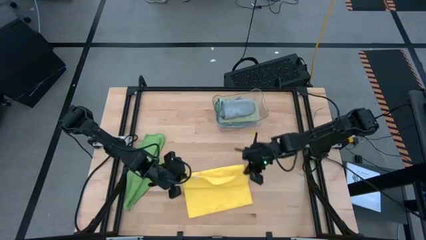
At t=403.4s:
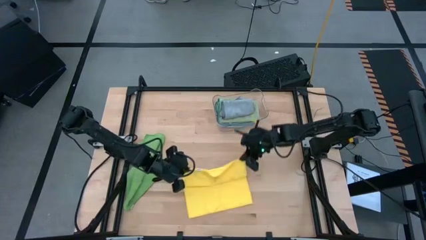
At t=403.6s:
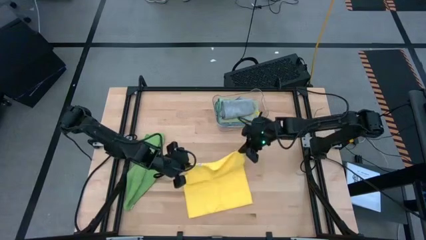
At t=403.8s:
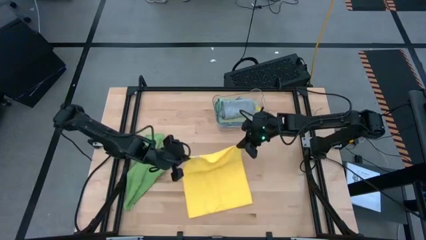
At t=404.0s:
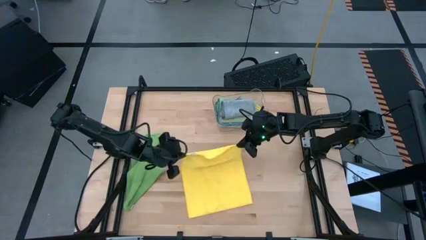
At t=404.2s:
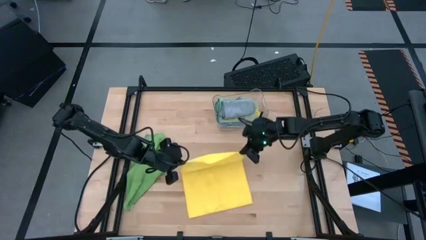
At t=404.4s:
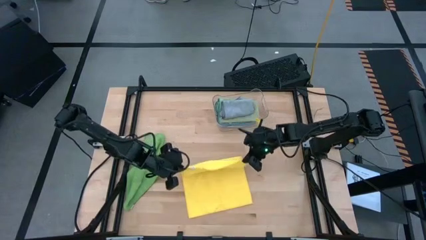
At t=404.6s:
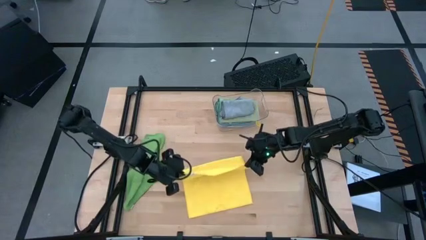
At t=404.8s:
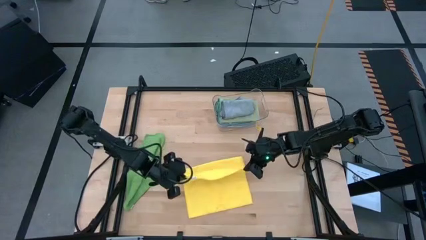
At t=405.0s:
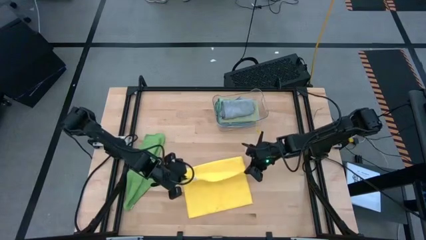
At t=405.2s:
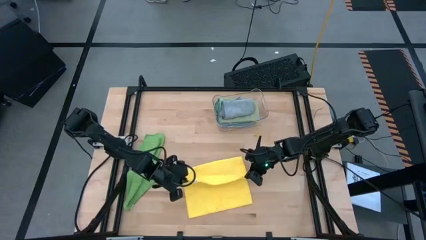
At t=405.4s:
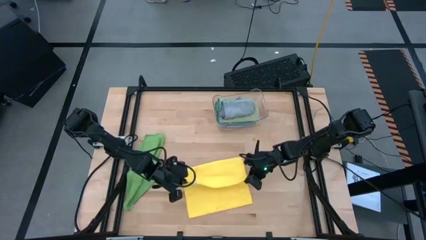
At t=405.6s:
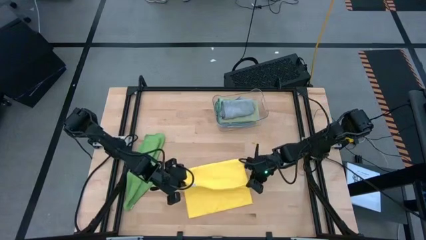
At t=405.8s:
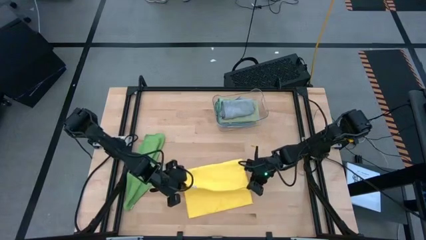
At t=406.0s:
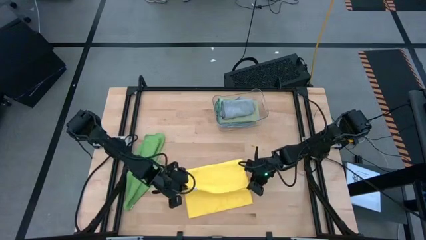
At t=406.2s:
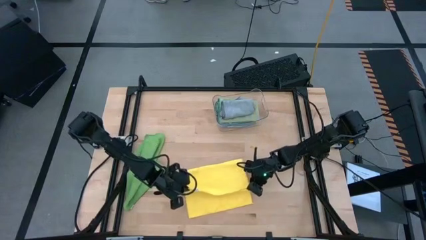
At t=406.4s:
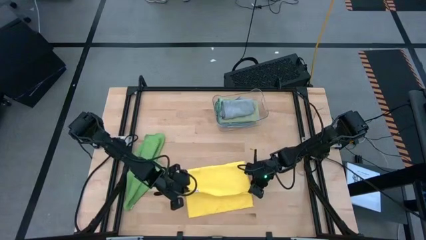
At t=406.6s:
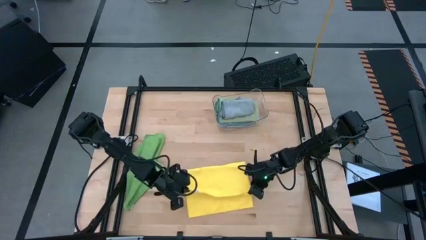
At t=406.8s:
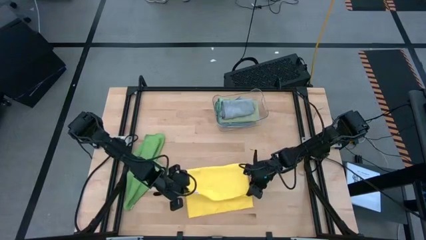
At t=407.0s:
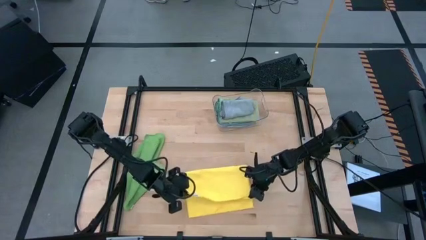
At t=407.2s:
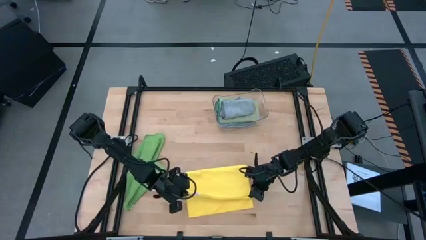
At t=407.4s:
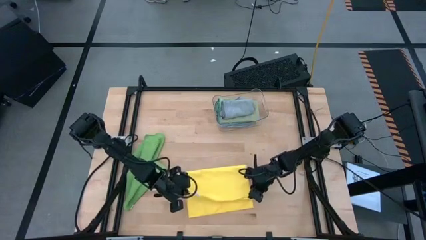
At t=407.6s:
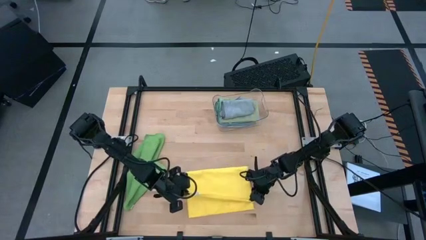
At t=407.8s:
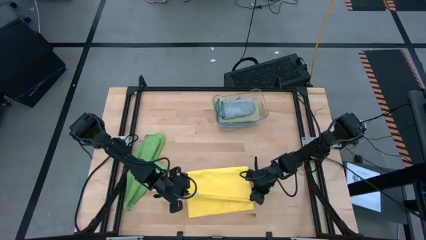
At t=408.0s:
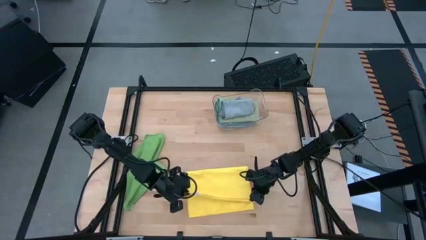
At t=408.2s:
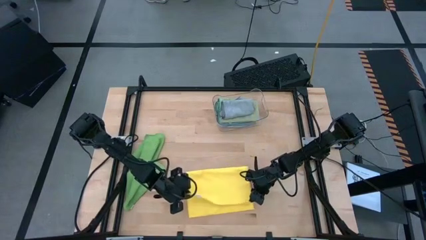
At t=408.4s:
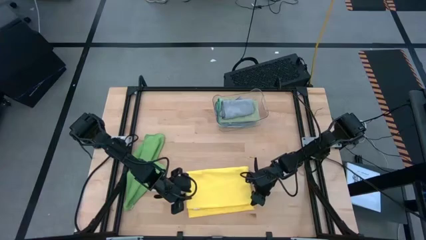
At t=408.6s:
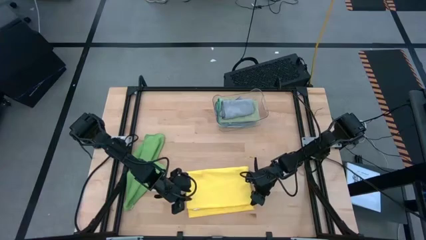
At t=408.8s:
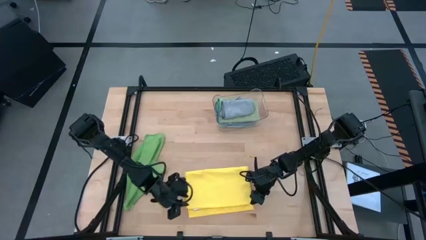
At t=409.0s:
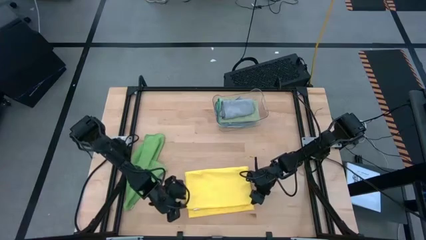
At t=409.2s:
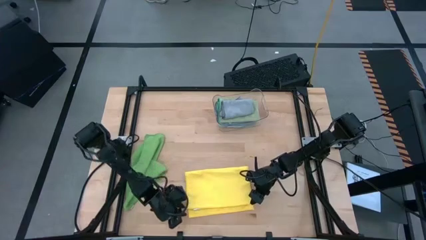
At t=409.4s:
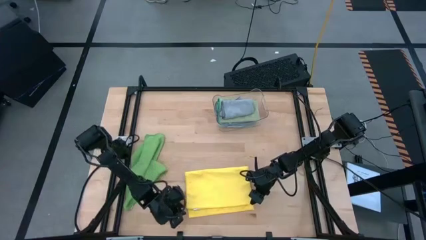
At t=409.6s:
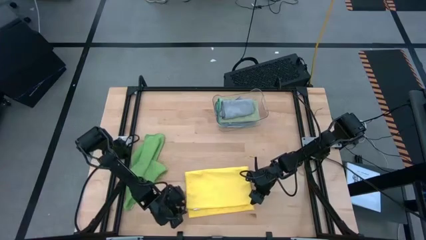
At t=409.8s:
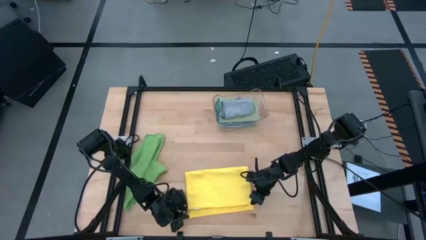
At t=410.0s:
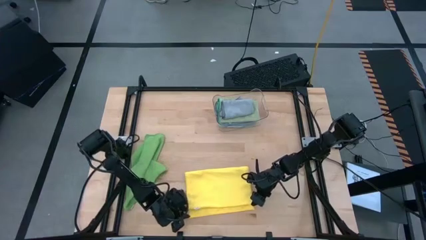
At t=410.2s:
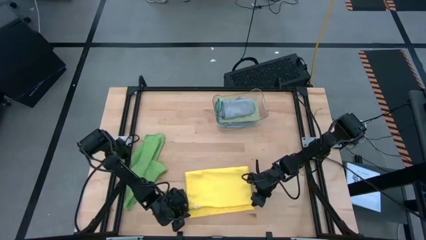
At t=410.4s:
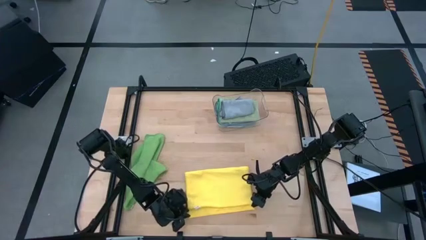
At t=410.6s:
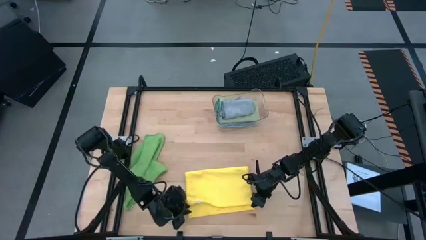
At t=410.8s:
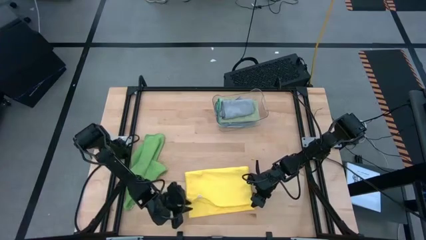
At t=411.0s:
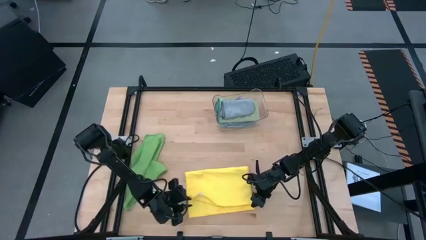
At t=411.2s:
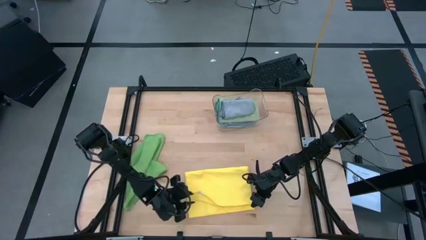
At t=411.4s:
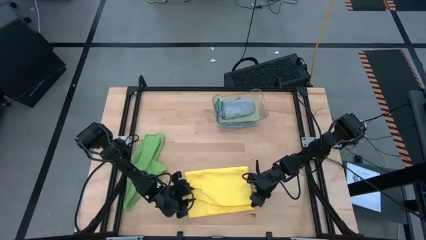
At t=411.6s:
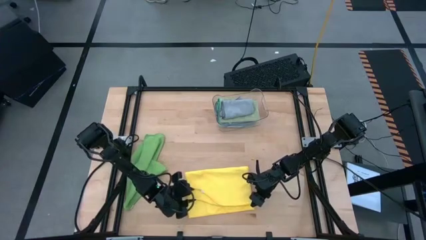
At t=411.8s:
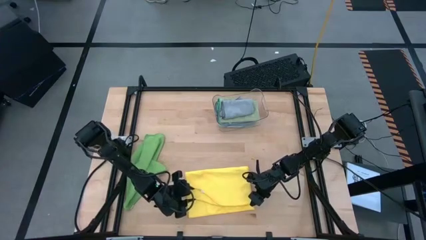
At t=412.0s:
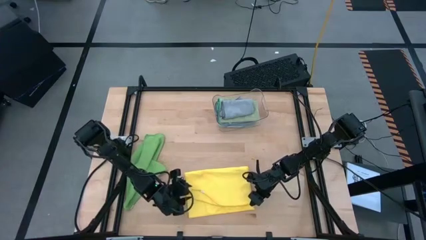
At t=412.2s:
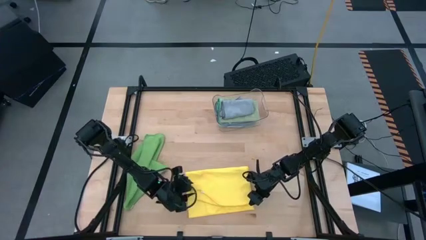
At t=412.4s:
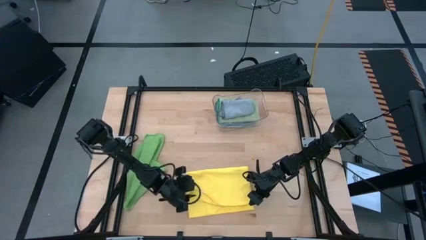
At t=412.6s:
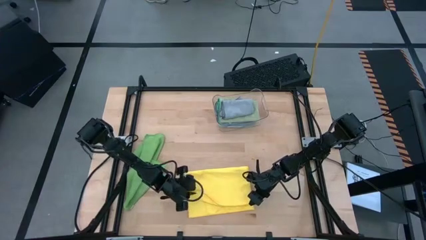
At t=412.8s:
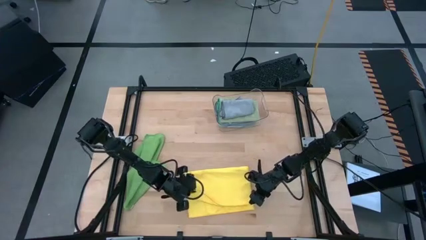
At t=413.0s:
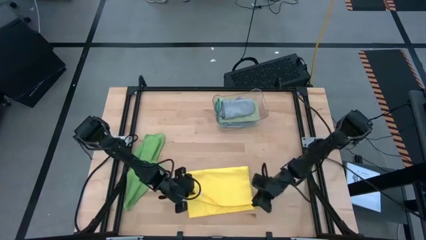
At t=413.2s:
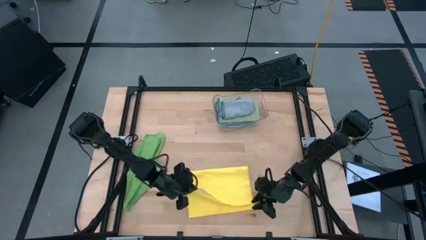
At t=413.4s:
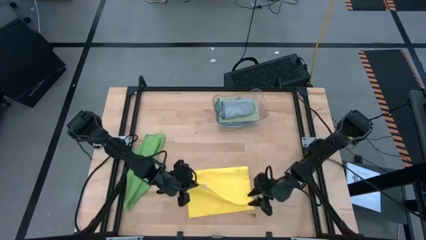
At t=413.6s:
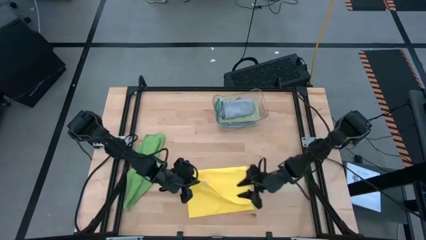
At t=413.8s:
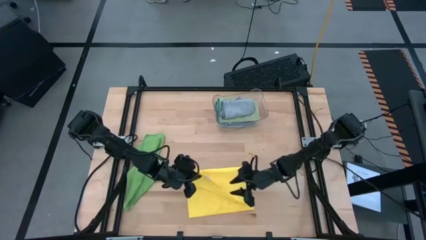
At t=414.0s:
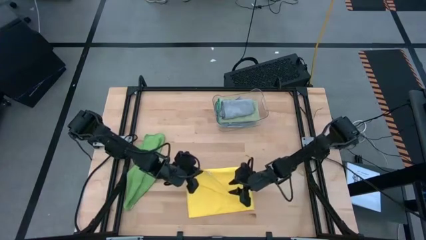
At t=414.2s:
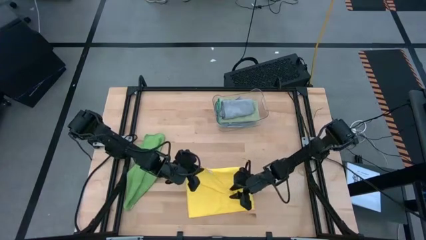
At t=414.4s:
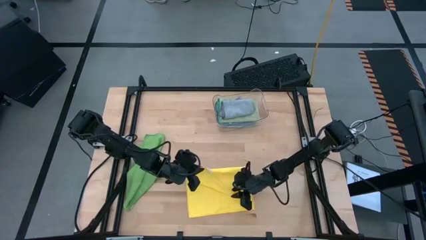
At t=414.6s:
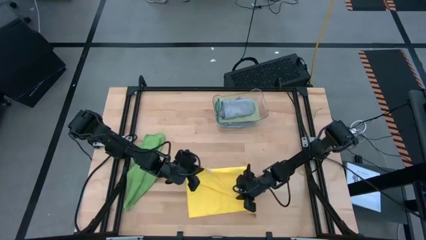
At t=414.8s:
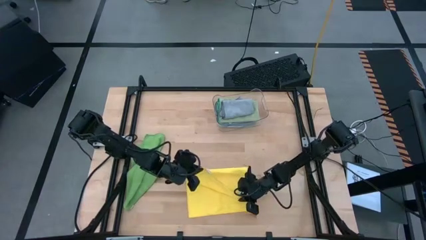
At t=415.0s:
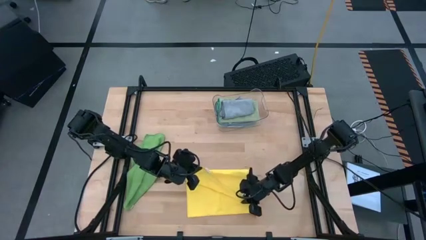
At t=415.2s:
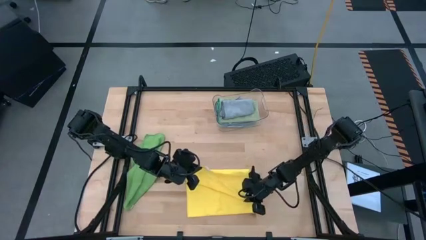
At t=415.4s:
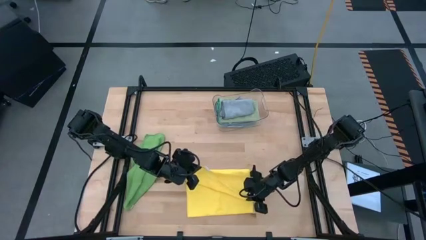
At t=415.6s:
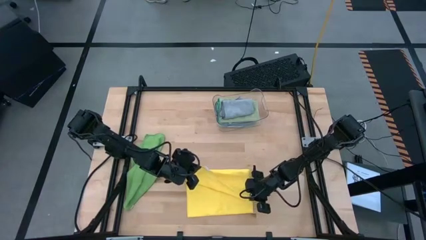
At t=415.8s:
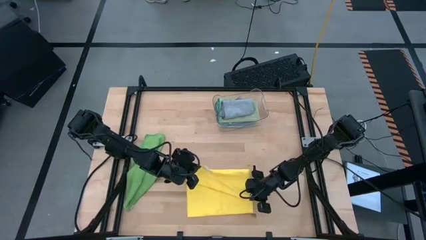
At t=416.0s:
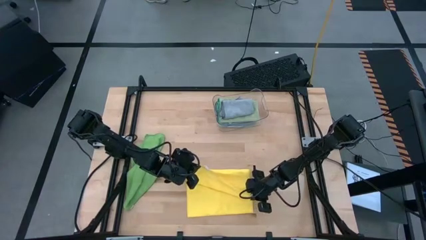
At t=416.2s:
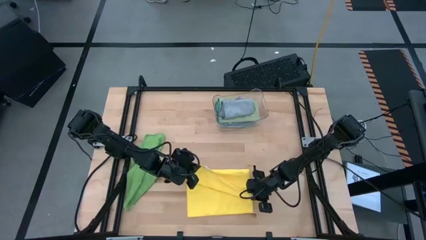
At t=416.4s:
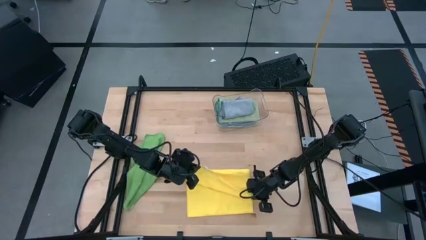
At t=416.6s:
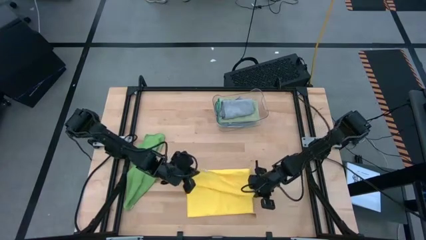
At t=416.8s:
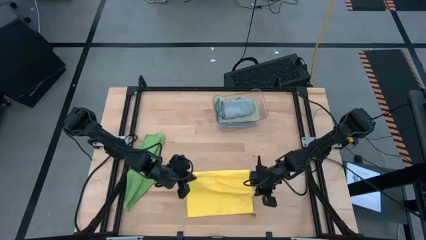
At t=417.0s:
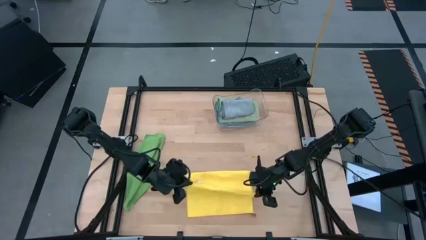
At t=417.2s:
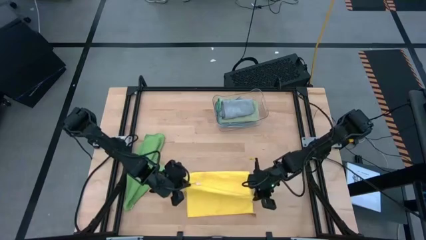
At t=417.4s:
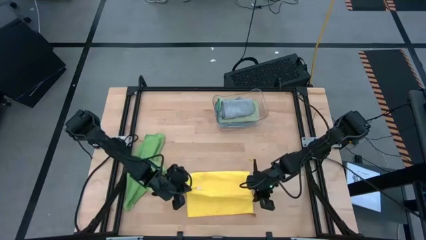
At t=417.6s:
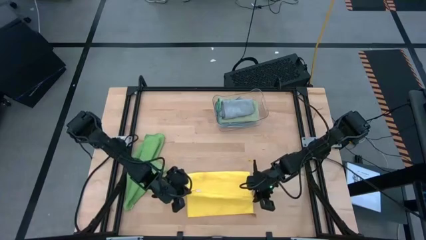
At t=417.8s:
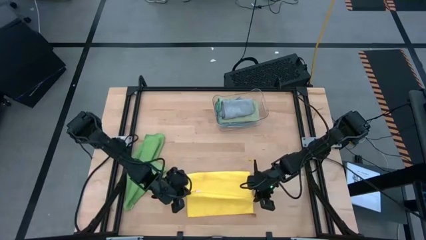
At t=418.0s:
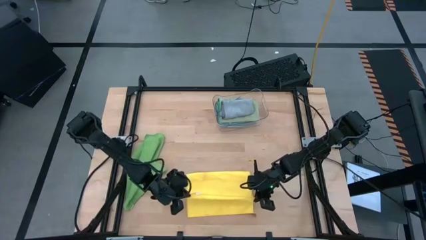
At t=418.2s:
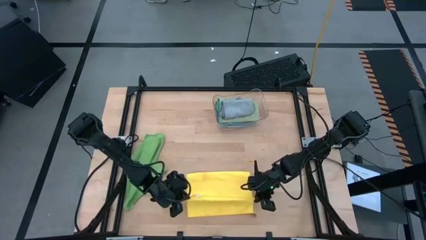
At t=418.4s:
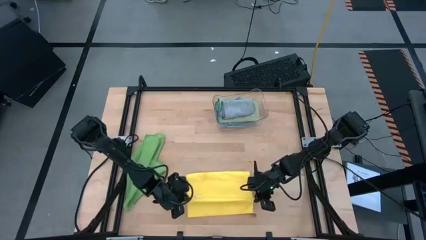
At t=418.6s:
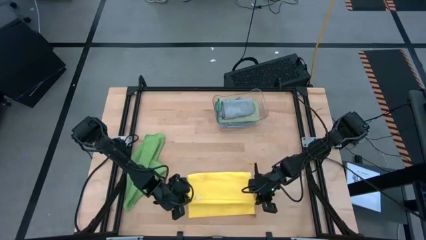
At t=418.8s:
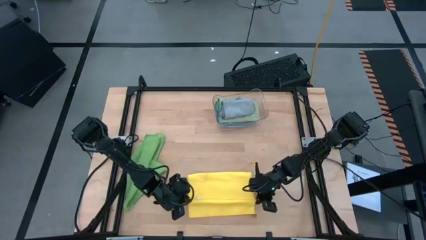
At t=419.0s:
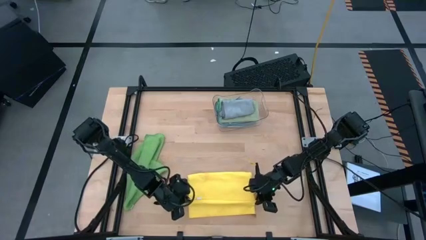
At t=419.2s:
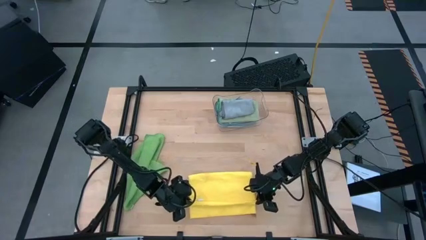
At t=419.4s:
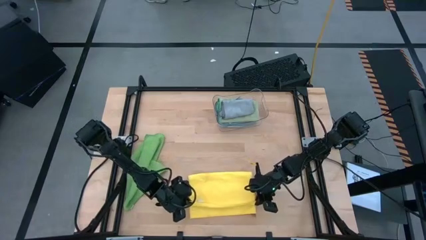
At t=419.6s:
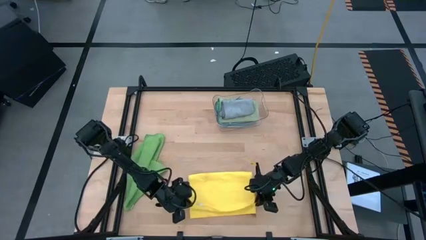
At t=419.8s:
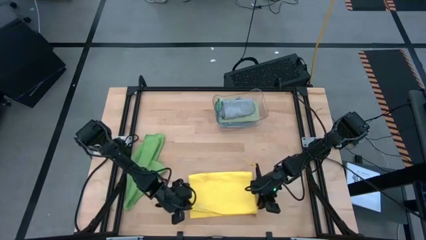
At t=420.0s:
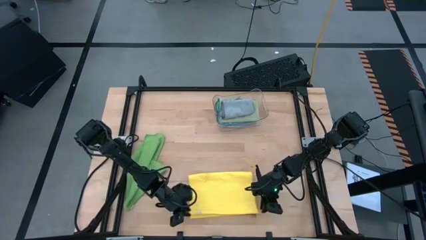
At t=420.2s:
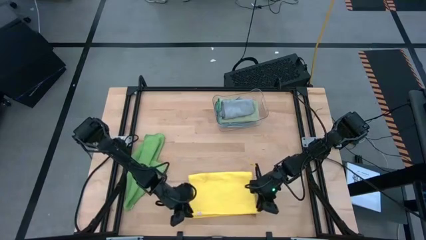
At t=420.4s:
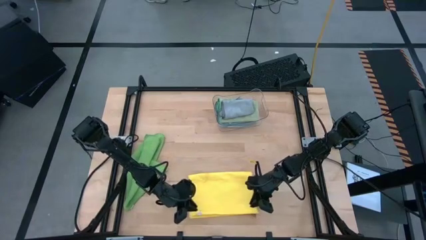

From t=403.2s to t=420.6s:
Task: Fold microfiber towels
Fold the yellow towel
